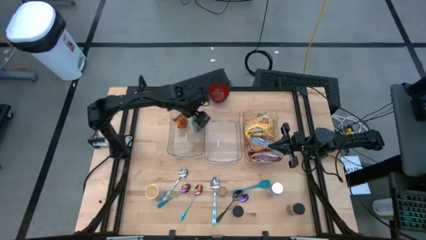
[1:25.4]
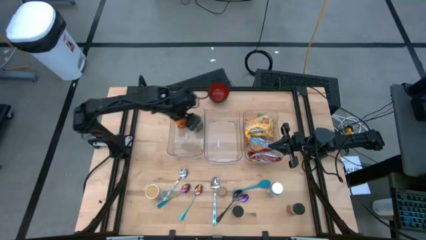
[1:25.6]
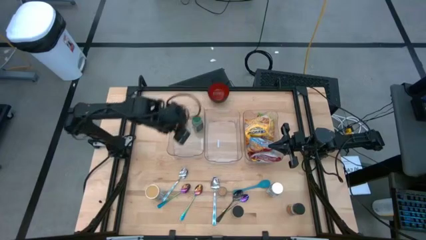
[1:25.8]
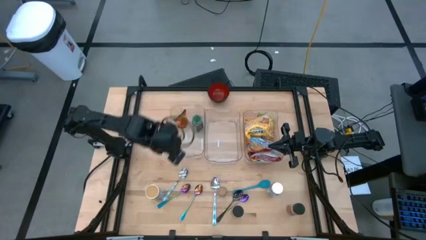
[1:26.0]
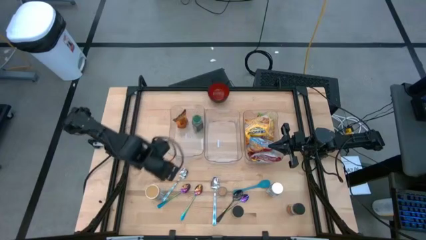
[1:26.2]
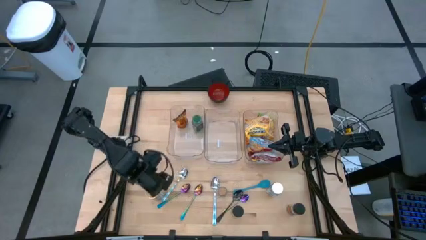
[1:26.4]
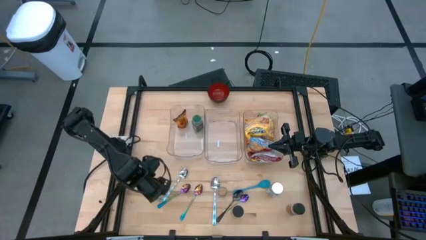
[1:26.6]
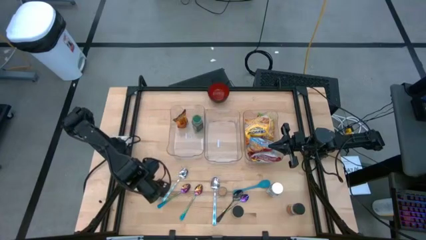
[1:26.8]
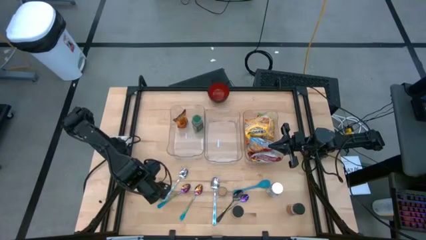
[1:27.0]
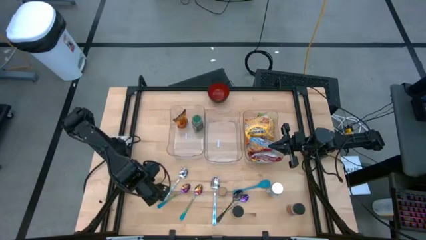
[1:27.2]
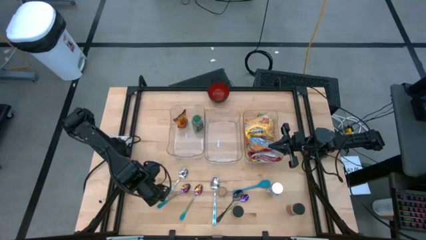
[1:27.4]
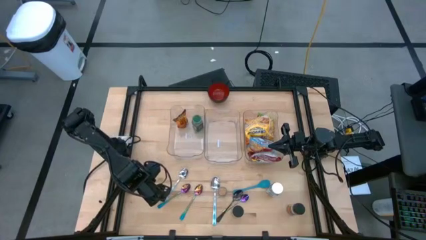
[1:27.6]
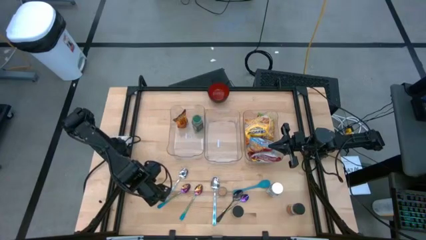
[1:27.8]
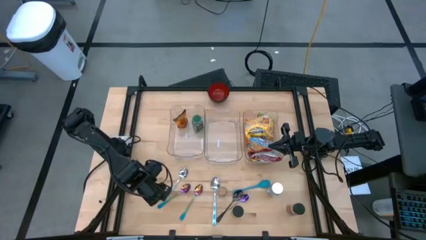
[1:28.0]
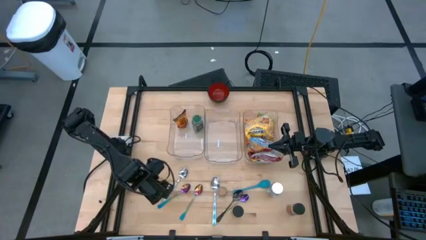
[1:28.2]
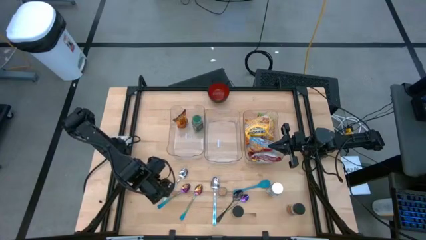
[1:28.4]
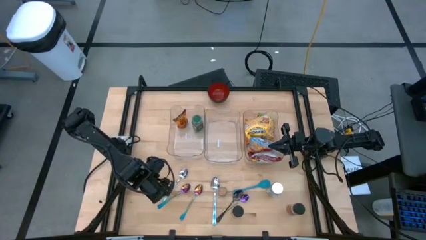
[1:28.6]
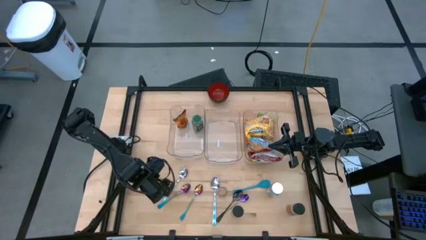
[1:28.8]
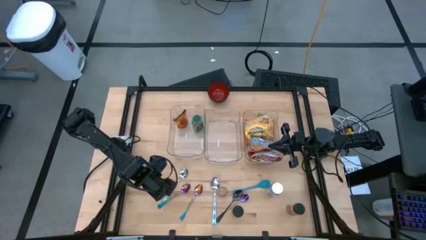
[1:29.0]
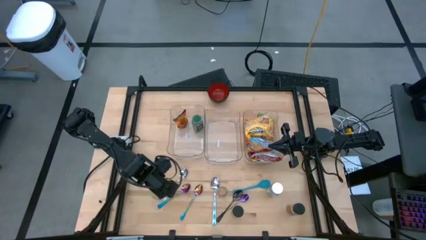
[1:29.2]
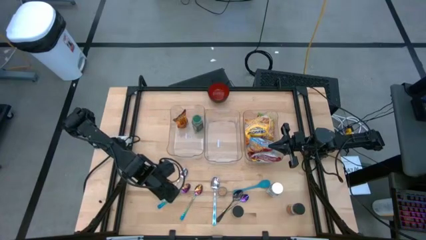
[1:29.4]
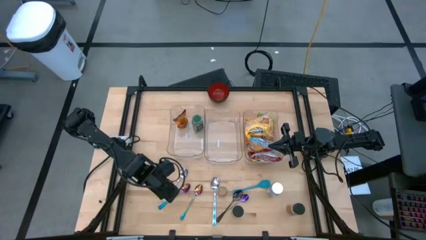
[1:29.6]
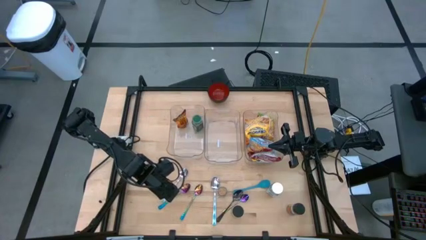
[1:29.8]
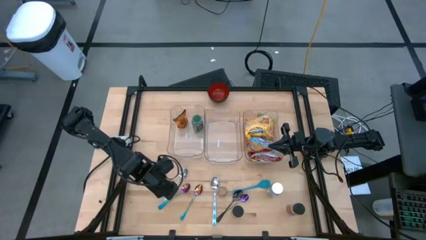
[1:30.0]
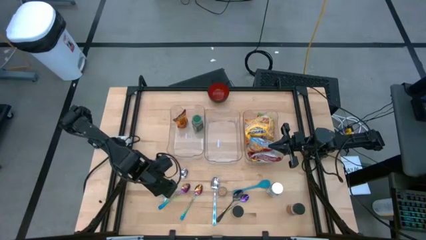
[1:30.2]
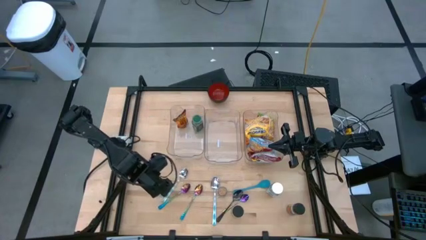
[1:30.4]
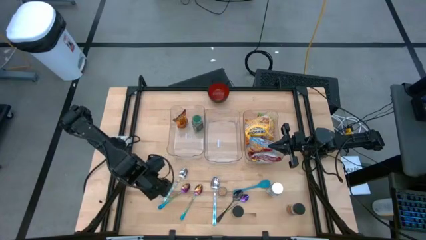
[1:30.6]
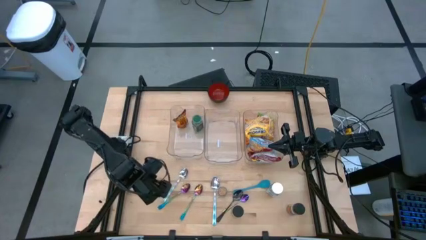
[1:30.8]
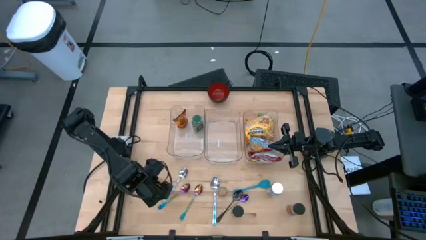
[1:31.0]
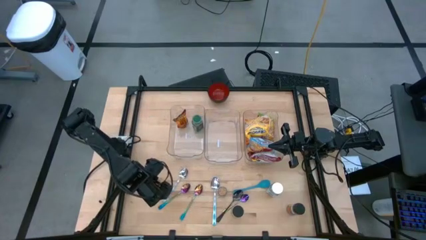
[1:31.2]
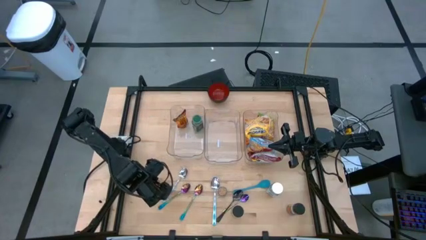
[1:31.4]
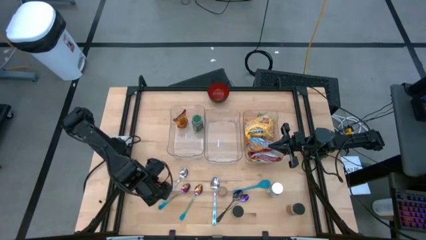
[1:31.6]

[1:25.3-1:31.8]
Task: Pick & Place Food Item
Put the gold seasoning bottle into the left transparent bin

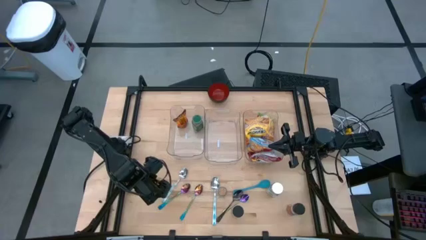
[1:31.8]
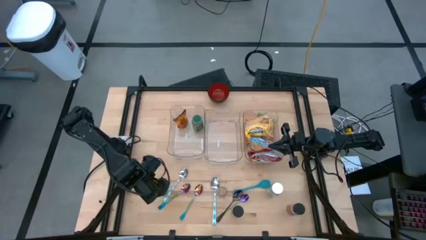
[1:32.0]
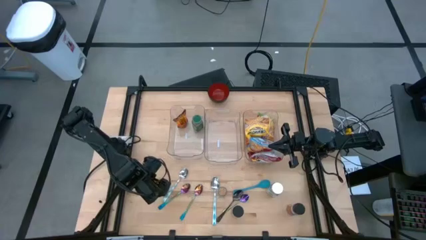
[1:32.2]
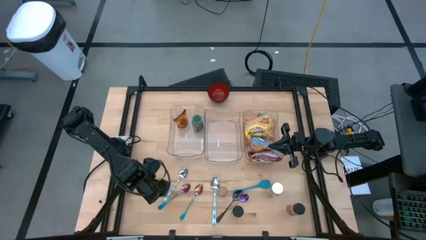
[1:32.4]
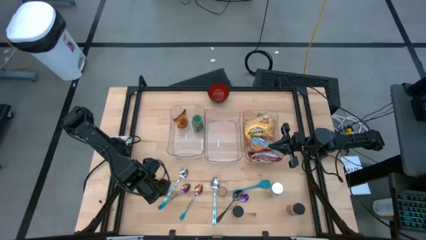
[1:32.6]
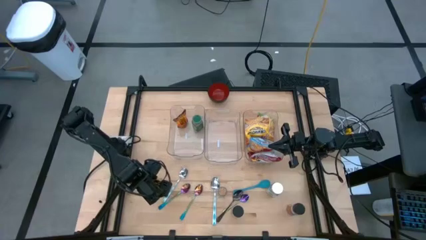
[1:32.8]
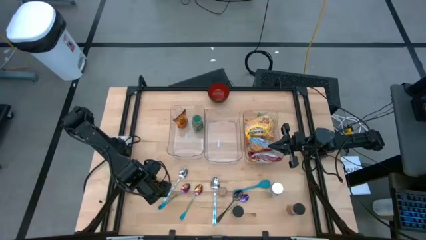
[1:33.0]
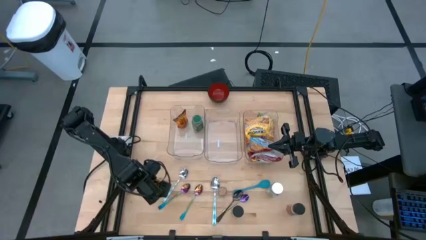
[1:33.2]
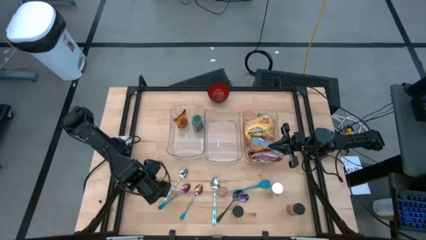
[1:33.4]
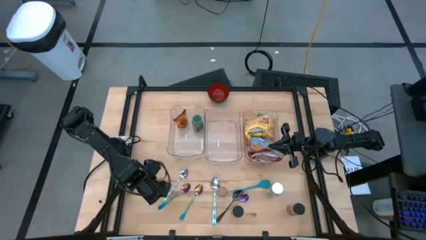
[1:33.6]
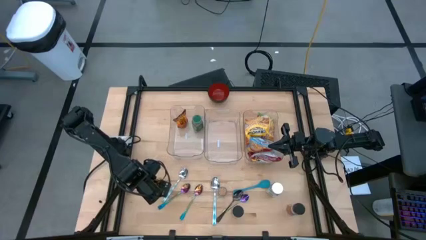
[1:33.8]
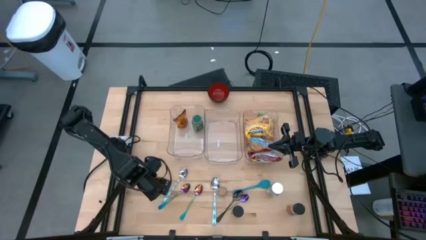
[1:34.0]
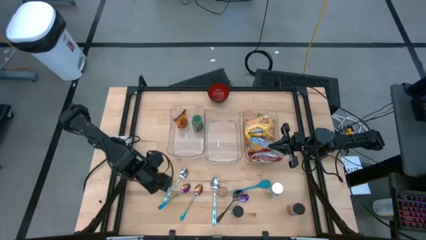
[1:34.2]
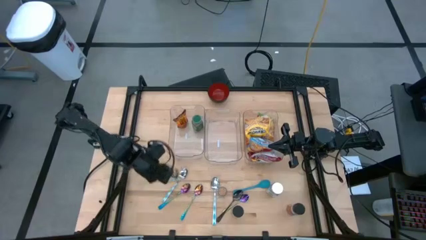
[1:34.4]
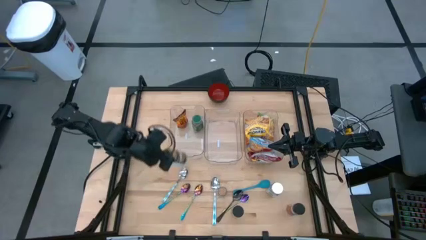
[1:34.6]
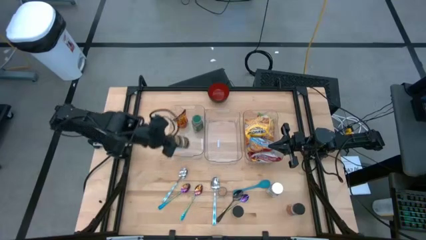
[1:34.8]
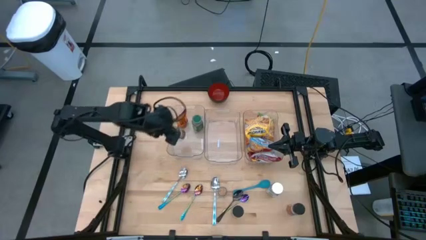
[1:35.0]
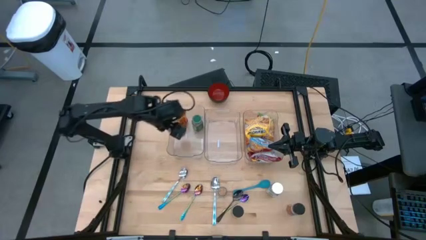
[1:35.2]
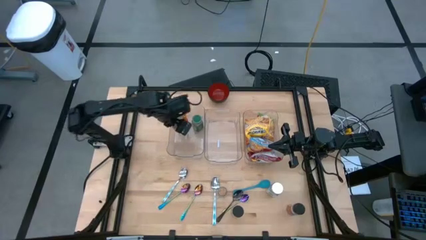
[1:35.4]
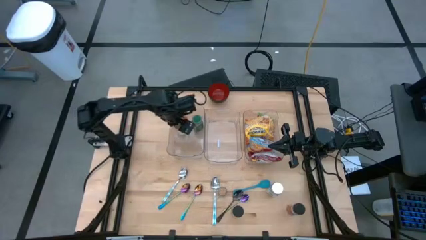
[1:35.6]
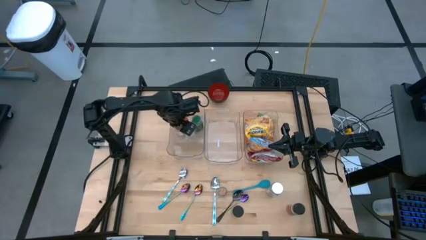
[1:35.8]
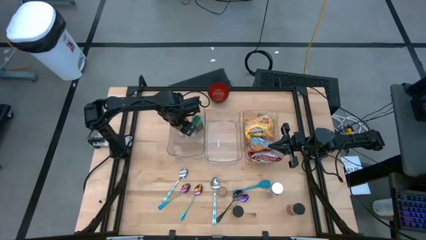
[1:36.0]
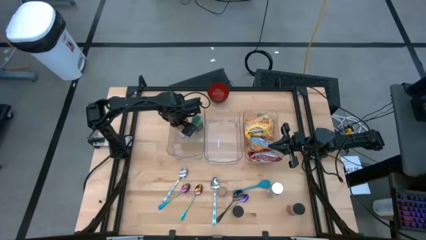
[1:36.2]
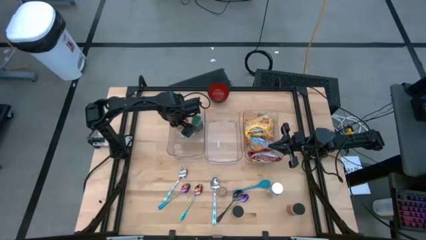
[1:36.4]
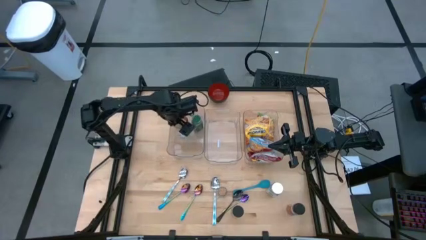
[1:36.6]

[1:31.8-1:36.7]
Put the gold seasoning bottle into the left transparent bin

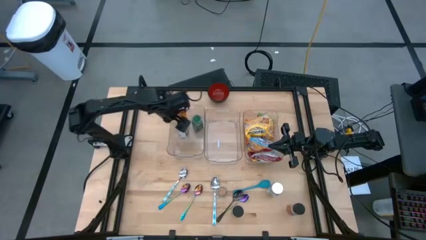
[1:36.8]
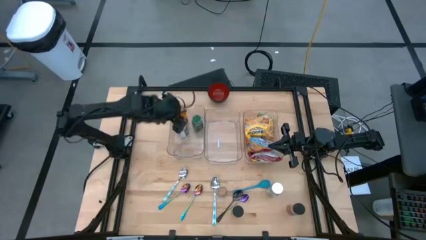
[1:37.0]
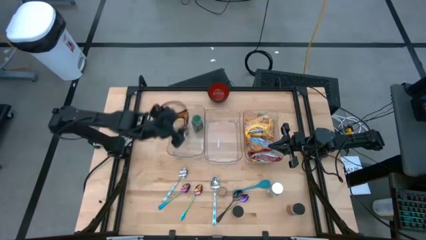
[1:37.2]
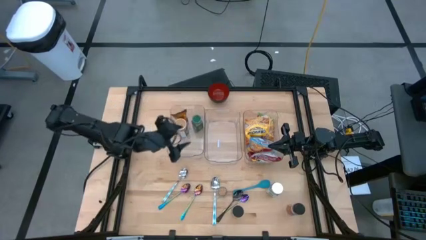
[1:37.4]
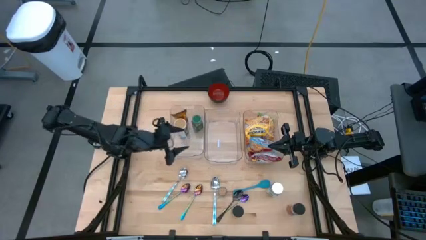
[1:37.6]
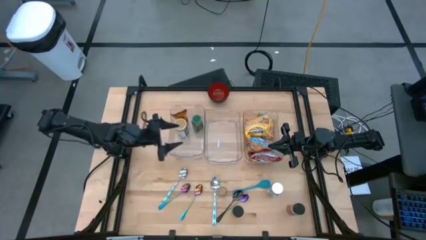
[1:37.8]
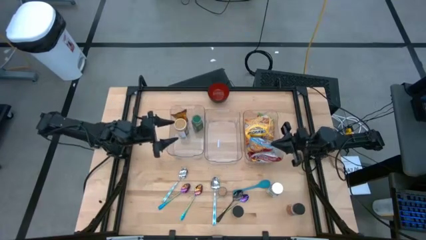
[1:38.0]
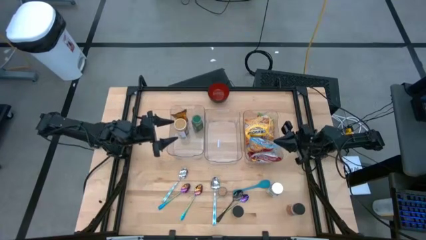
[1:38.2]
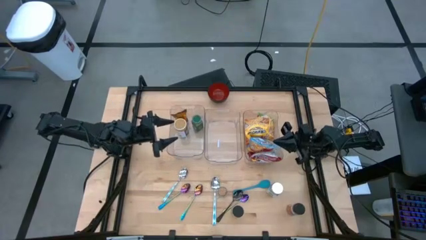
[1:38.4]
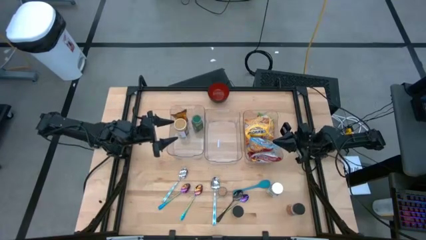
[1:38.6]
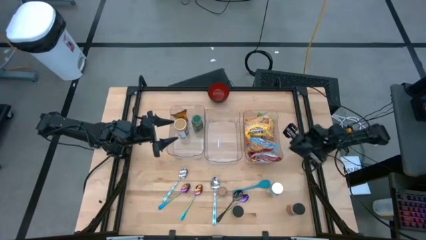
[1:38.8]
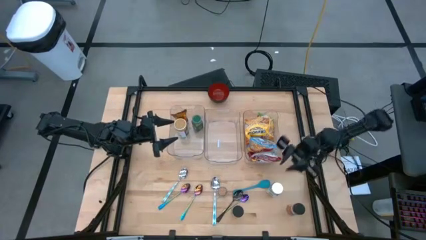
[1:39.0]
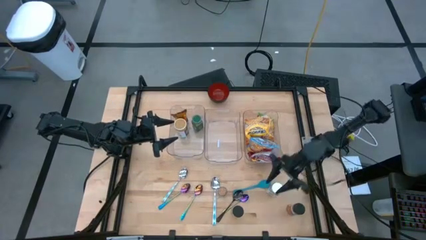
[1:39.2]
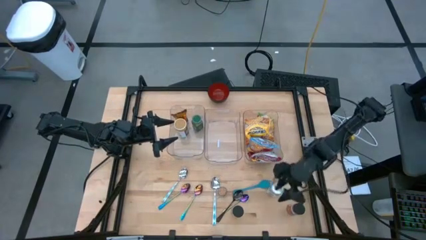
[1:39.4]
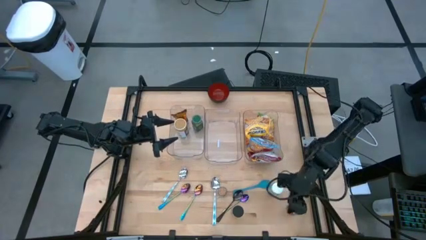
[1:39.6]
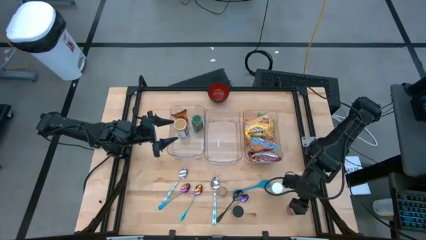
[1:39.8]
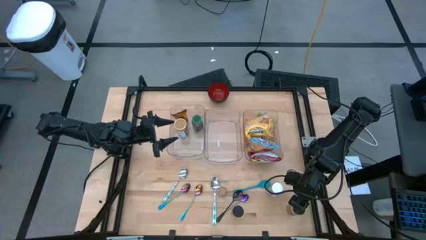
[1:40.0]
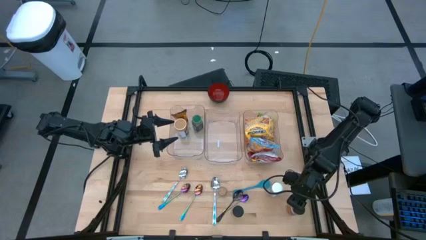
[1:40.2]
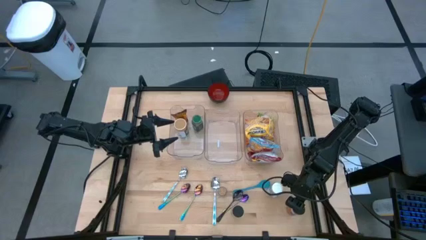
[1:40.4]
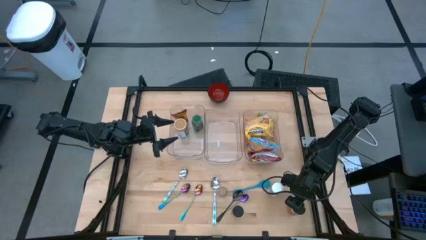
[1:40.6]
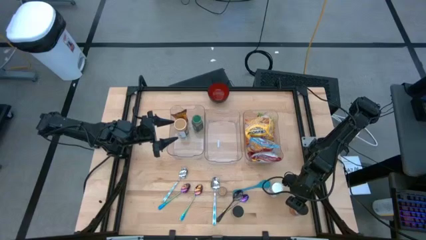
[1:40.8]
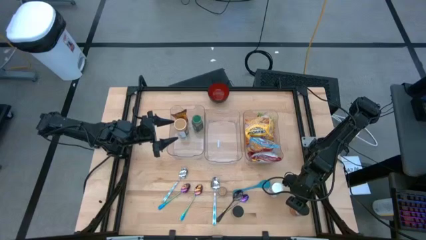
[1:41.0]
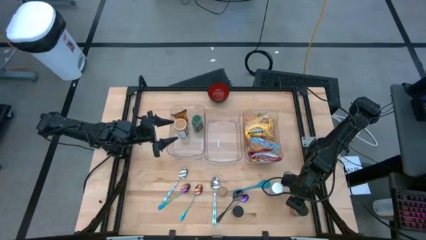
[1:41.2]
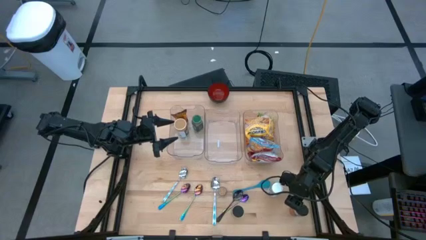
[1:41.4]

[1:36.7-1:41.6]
Put the orange seasoning bottle into the left transparent bin
